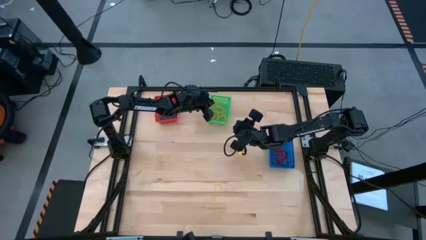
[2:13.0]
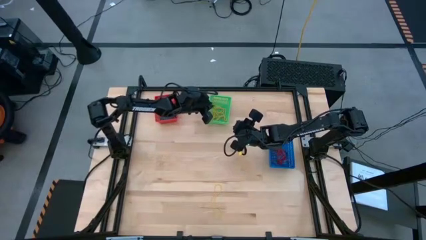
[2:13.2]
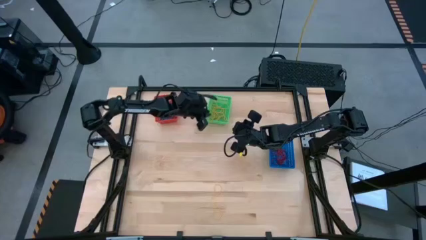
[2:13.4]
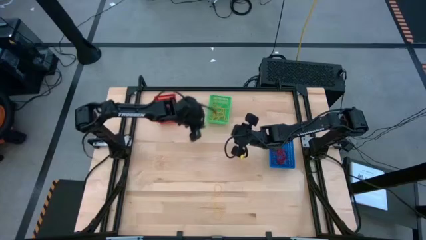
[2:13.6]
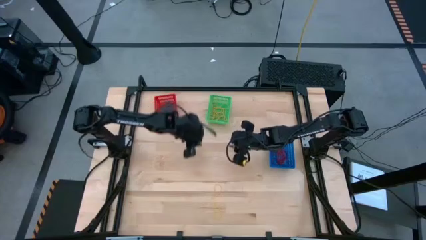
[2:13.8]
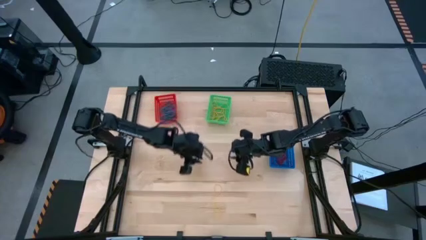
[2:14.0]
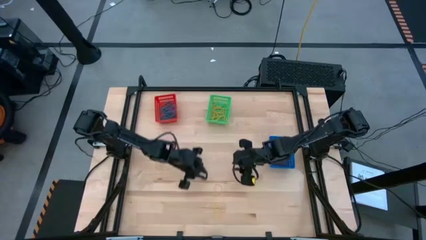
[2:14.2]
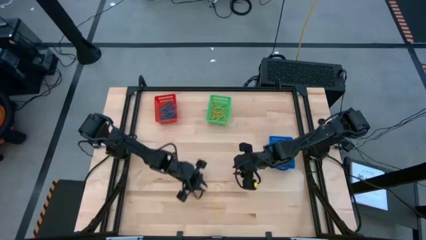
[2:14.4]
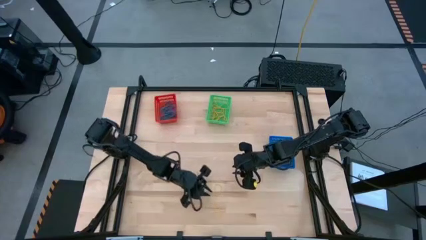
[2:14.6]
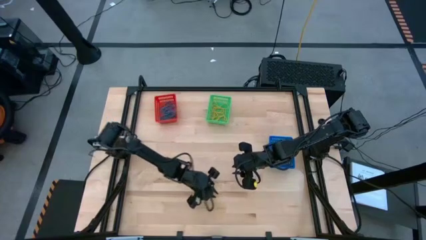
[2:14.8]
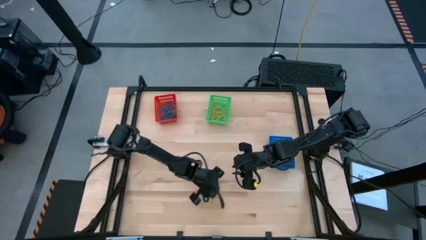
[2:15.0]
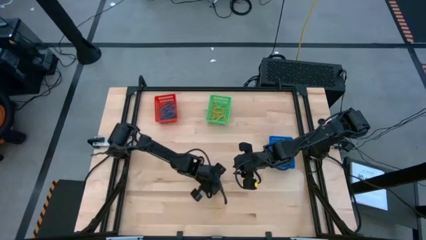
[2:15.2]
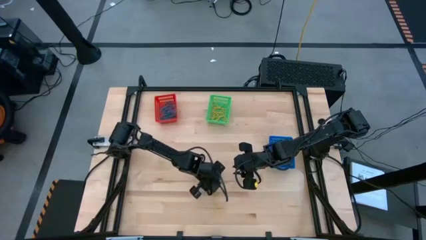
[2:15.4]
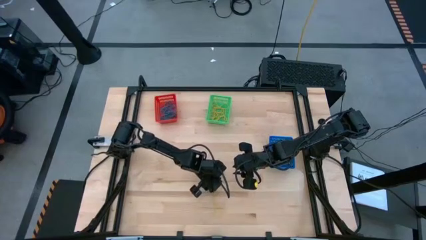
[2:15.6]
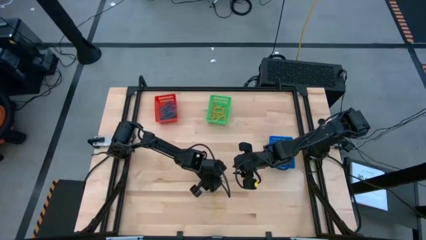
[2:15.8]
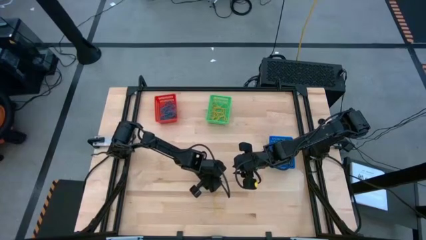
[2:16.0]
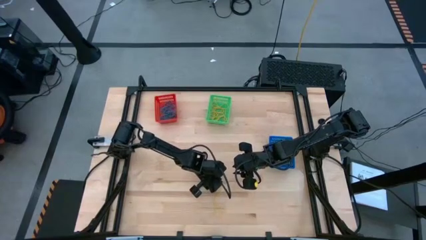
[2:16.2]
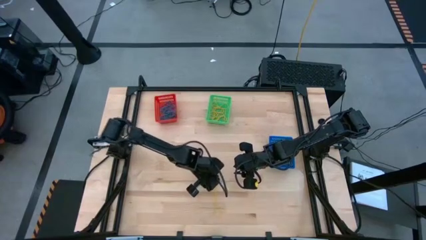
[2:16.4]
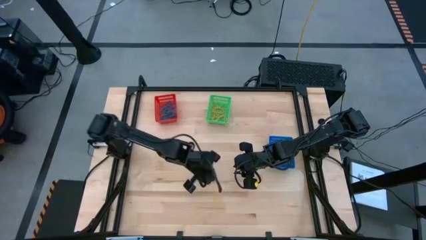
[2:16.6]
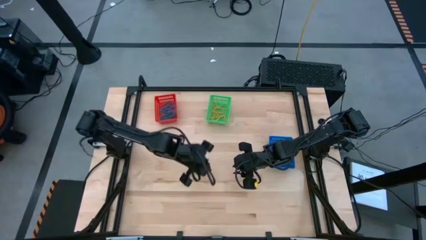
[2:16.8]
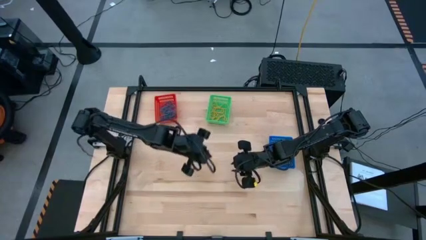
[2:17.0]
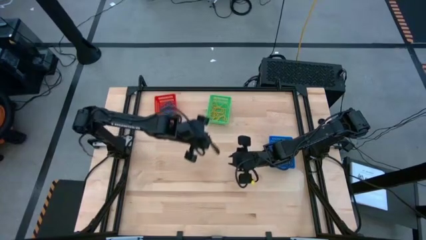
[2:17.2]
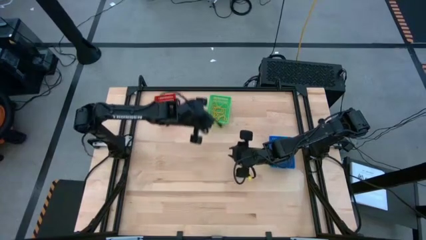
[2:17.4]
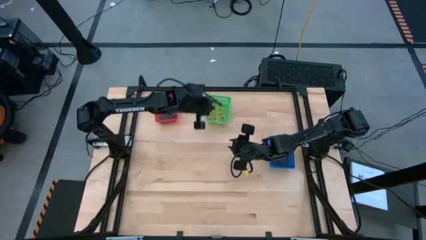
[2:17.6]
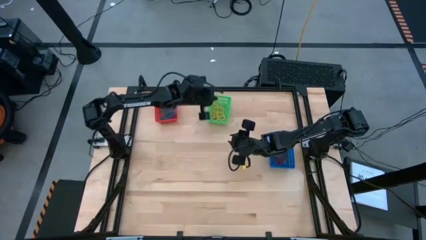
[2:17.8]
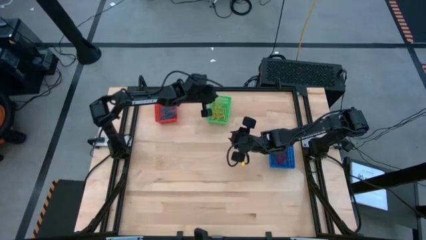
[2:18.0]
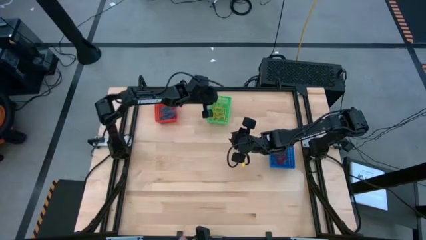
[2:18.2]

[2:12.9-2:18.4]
Task: Sort rubber bands into baskets
Put the yellow rubber band into the green bin

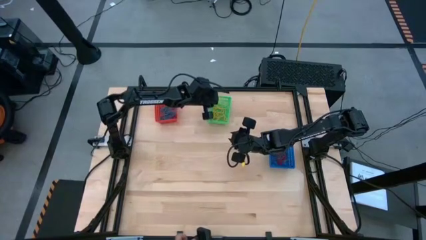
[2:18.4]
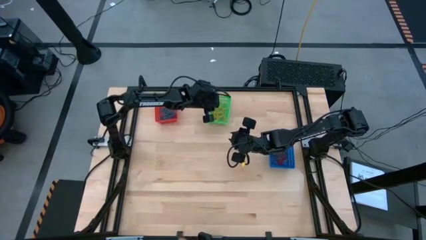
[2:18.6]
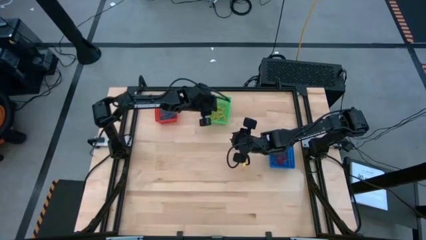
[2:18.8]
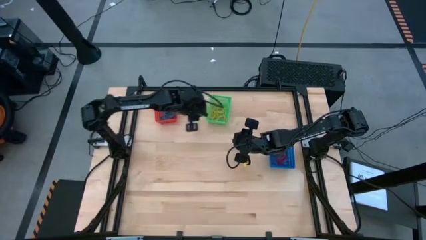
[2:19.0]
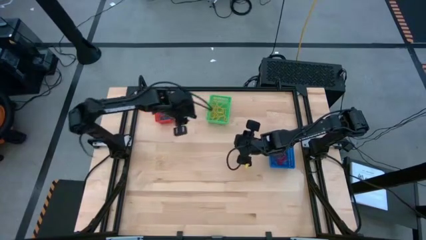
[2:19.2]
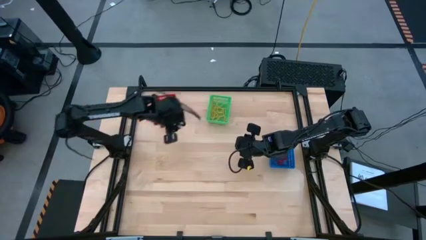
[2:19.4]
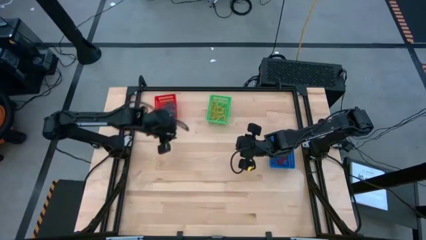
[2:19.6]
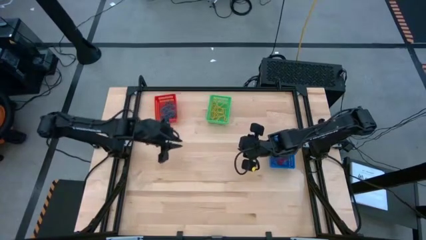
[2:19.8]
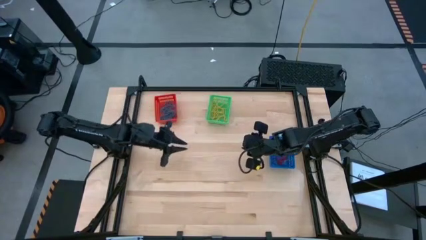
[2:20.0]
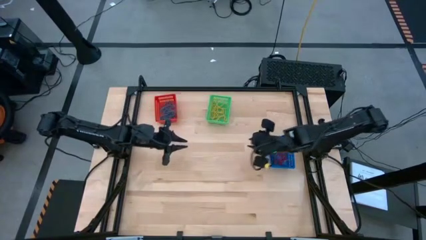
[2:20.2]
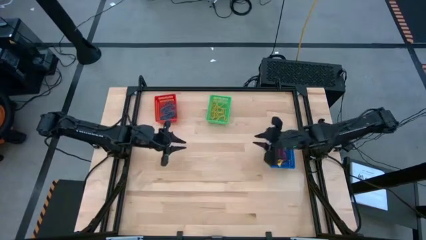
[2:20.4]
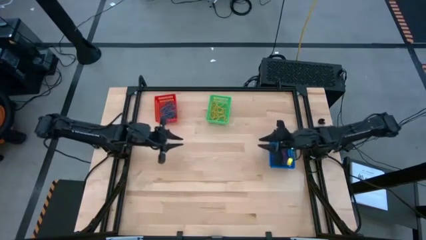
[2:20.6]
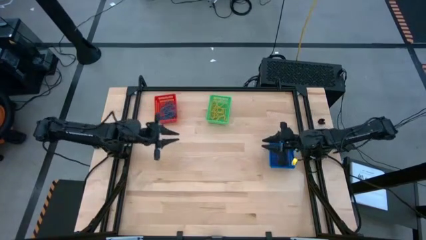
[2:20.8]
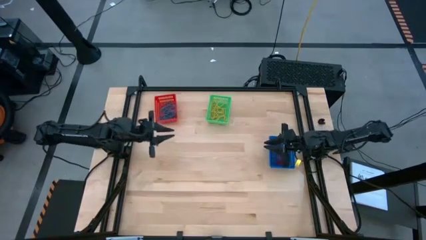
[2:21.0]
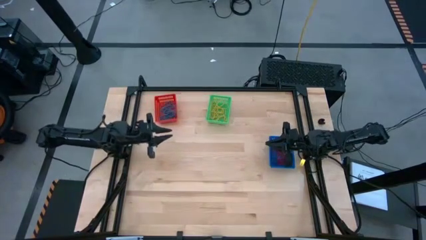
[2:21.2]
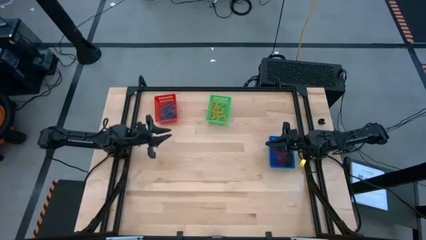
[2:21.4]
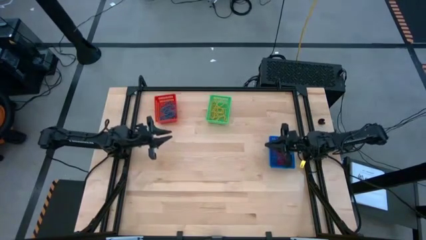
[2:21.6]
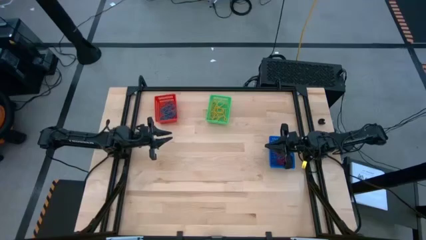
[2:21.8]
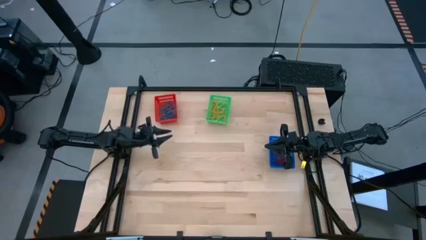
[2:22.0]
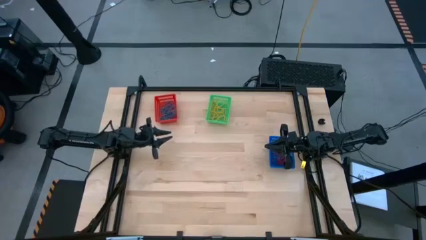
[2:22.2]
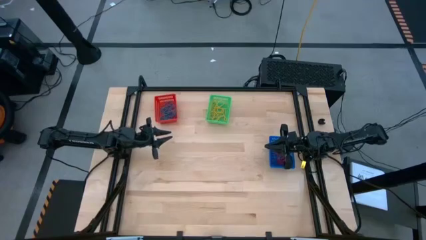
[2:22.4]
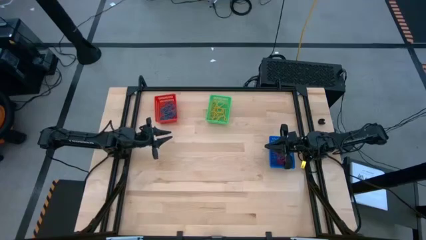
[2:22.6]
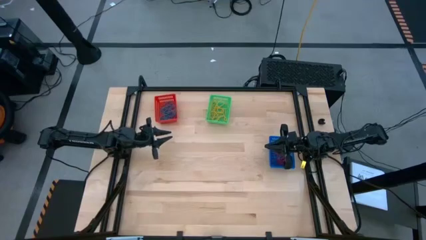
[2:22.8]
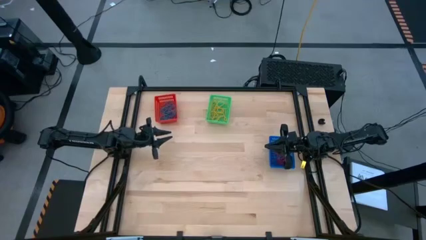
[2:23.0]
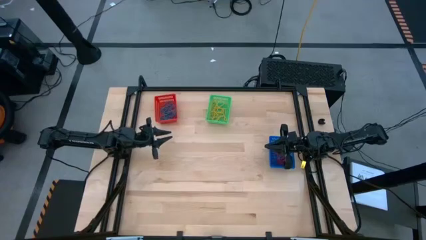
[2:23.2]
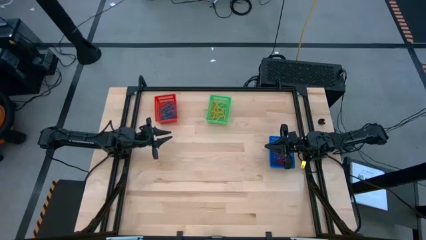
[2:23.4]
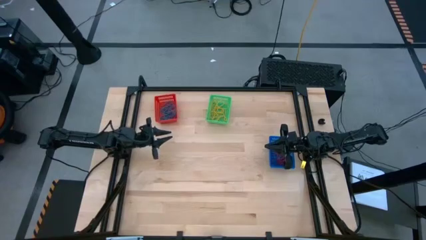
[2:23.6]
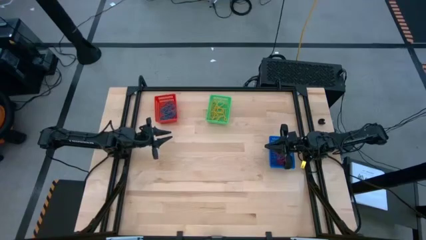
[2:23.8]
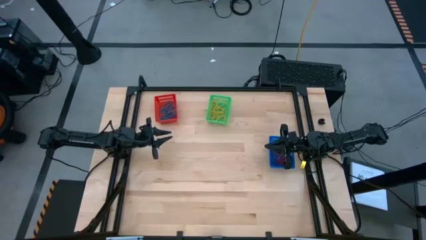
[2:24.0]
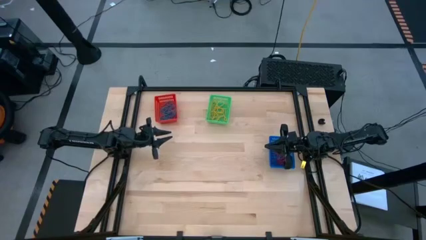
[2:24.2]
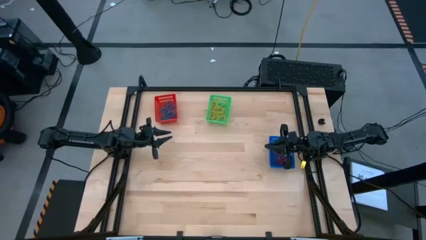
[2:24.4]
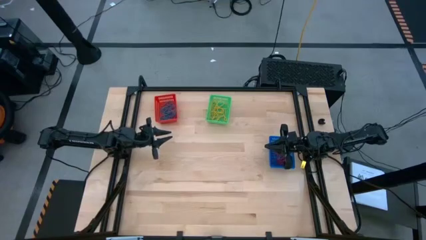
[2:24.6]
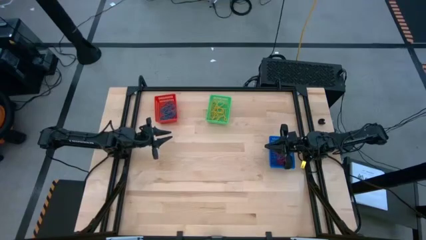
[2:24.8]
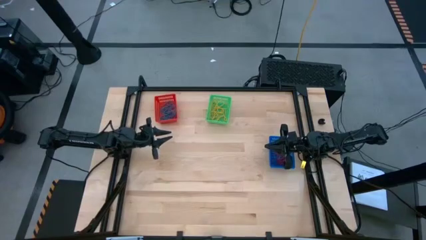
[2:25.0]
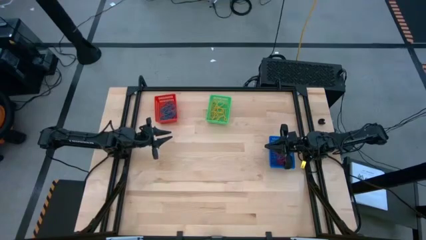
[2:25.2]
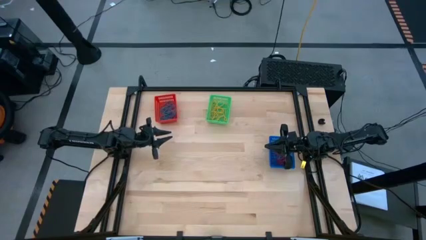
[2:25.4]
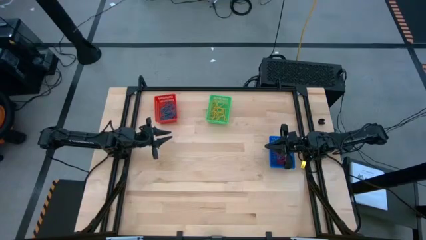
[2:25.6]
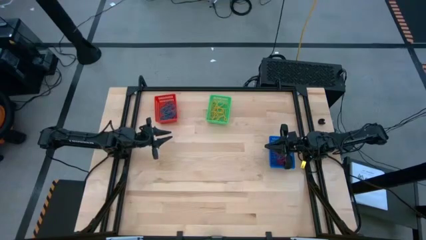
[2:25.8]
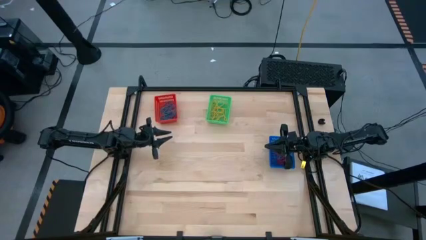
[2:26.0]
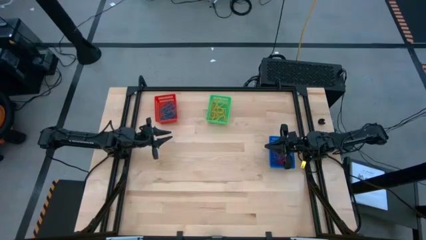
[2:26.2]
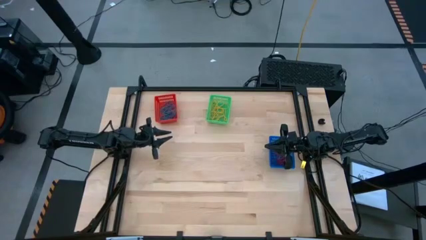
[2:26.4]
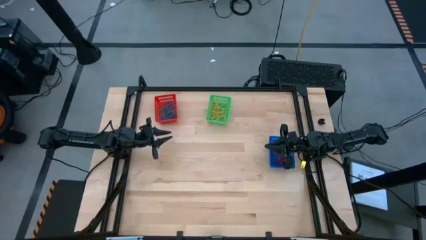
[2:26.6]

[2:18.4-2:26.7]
Return to Home Position

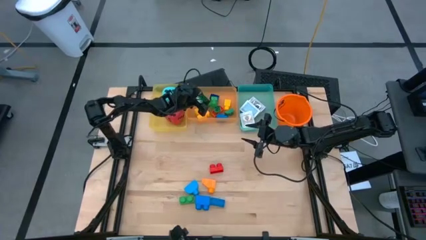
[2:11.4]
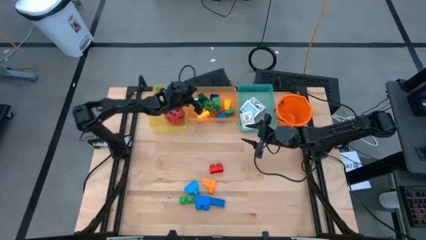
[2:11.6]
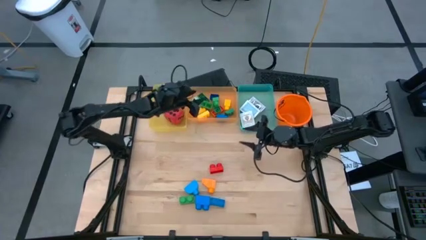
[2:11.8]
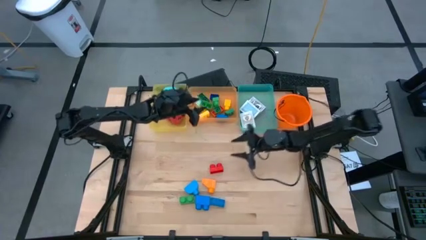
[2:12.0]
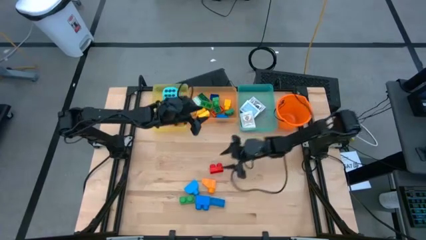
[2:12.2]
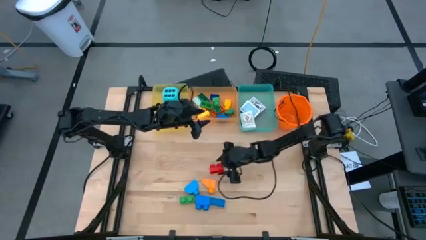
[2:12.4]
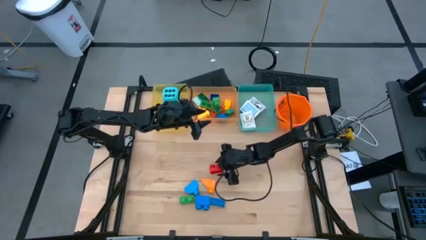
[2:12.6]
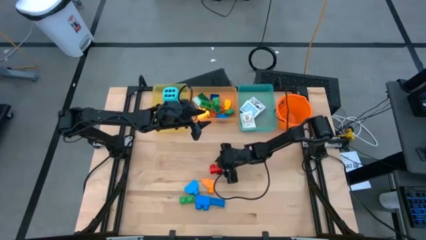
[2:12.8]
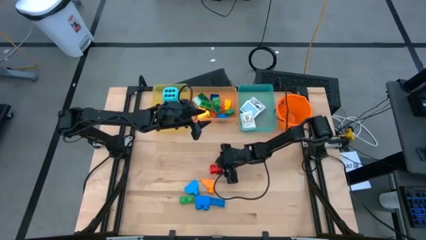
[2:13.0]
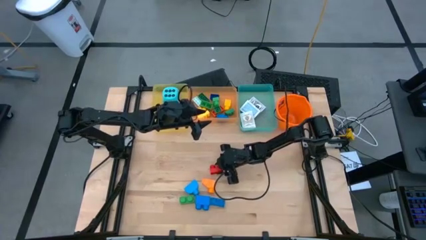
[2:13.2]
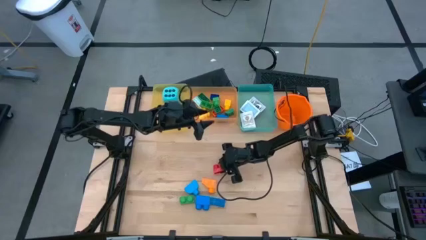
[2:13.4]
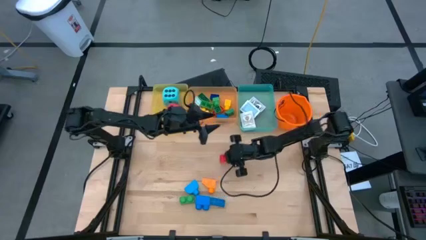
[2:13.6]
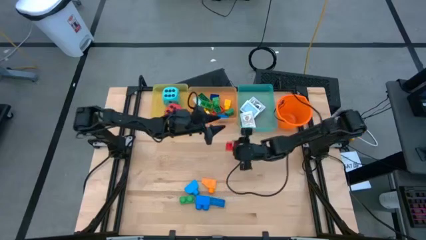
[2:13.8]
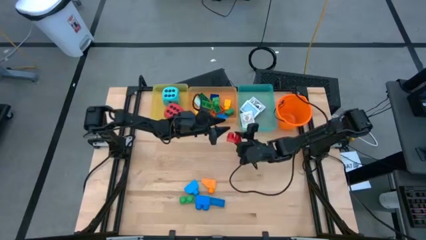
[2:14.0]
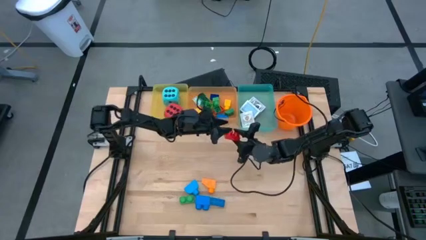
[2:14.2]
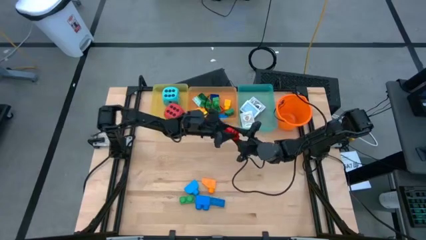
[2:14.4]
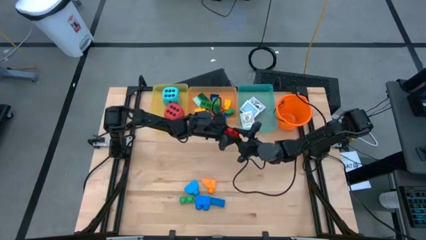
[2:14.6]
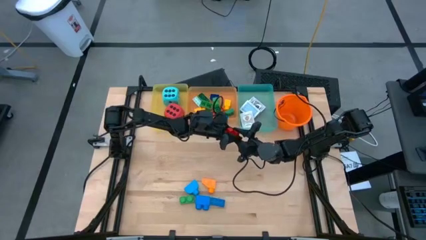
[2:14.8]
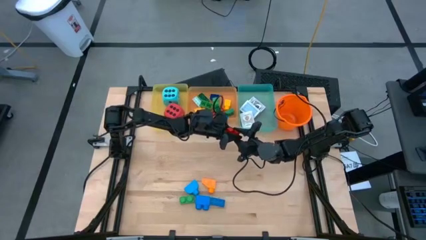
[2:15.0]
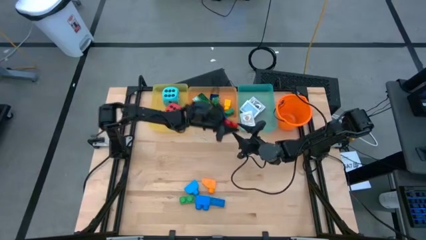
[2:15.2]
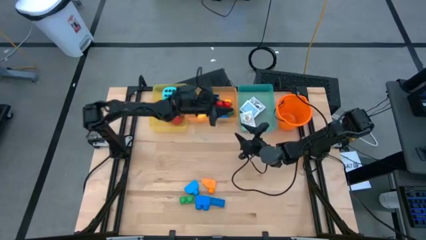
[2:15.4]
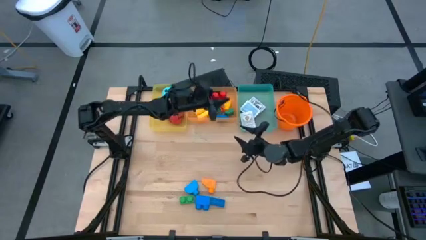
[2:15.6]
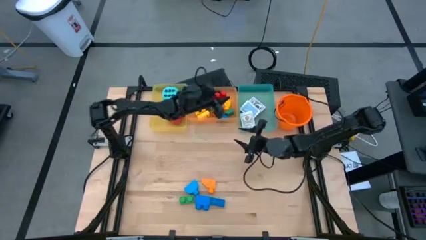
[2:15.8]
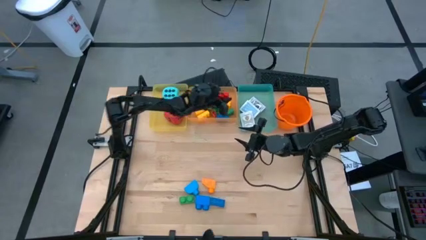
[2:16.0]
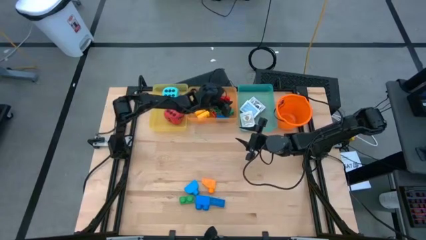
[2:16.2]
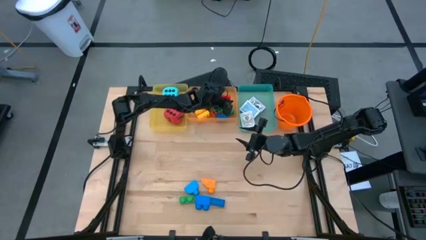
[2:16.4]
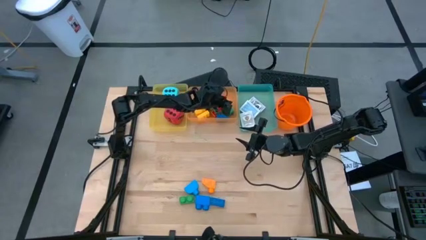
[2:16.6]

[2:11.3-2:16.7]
Task: Pick & Place Toys
Put the red game piece into the orange bin
